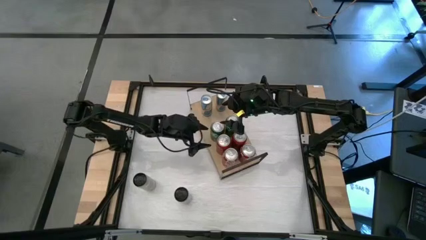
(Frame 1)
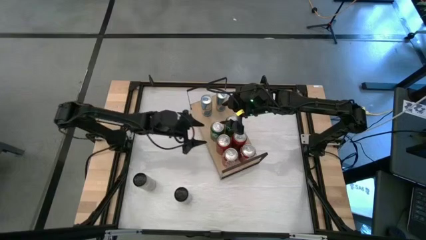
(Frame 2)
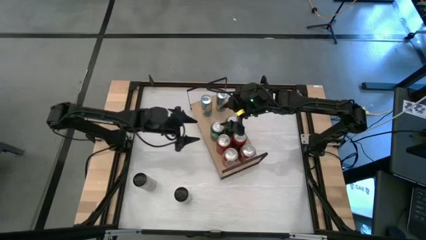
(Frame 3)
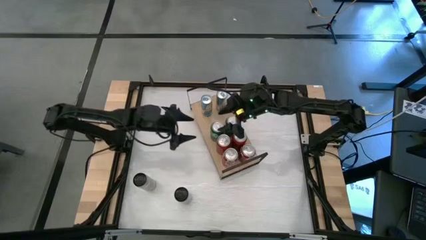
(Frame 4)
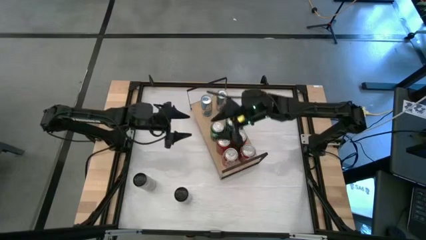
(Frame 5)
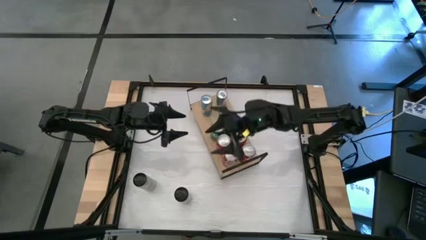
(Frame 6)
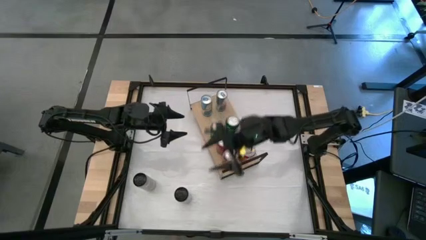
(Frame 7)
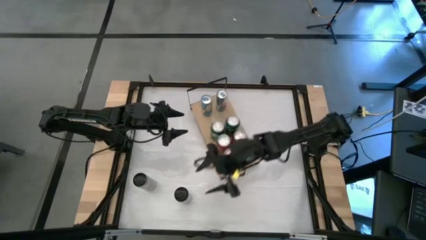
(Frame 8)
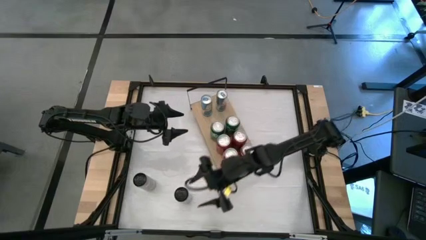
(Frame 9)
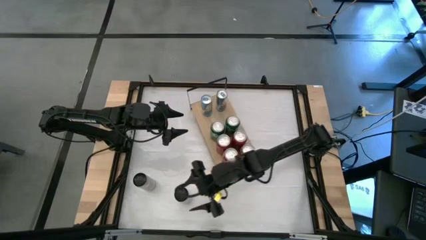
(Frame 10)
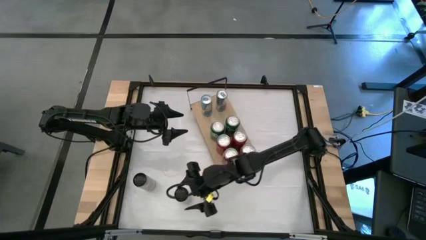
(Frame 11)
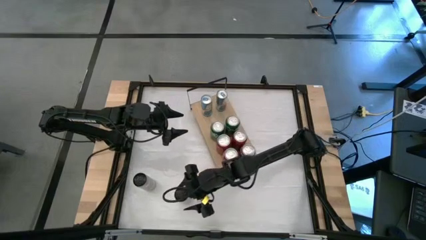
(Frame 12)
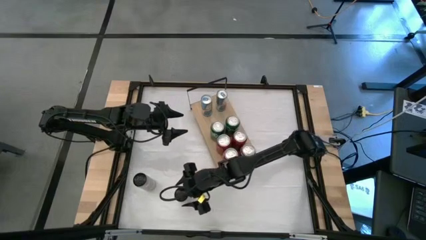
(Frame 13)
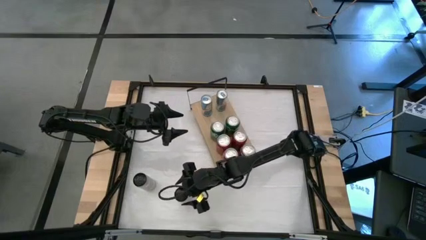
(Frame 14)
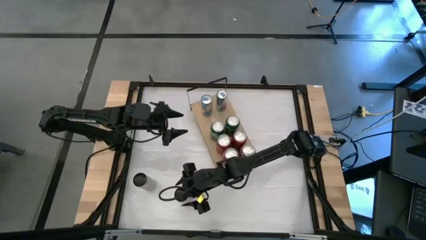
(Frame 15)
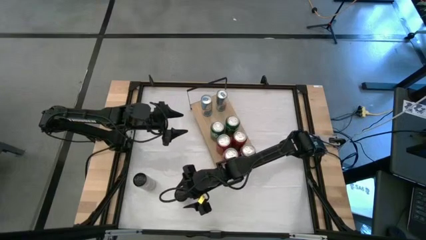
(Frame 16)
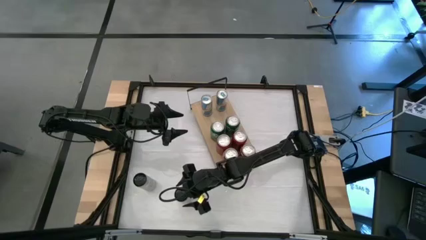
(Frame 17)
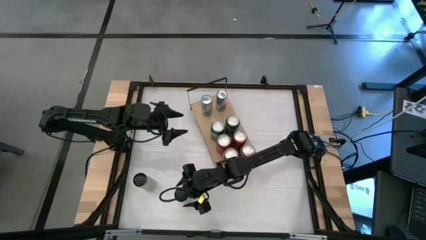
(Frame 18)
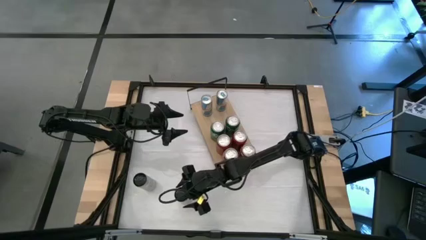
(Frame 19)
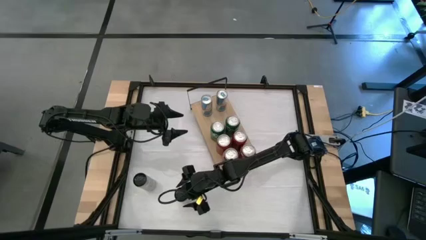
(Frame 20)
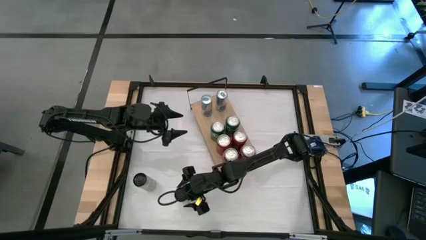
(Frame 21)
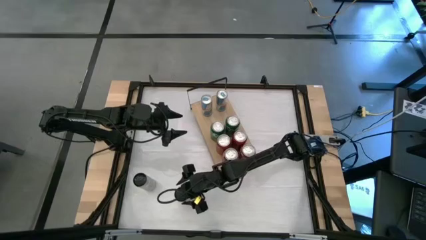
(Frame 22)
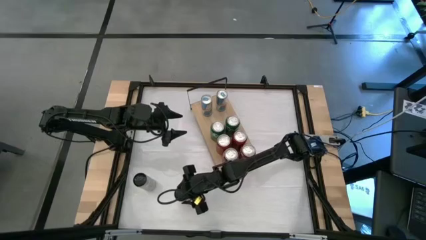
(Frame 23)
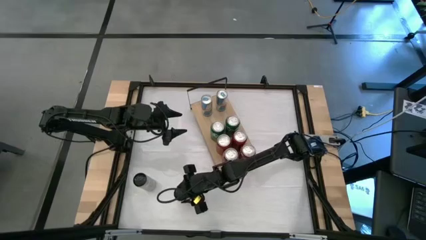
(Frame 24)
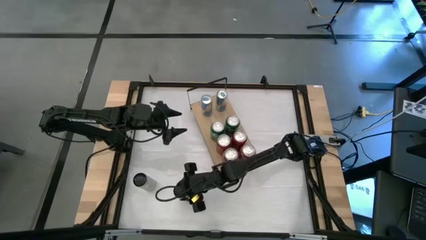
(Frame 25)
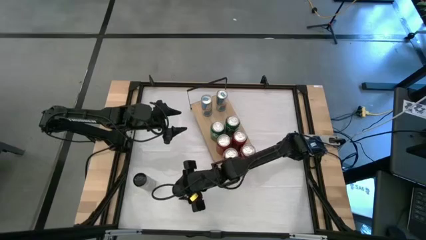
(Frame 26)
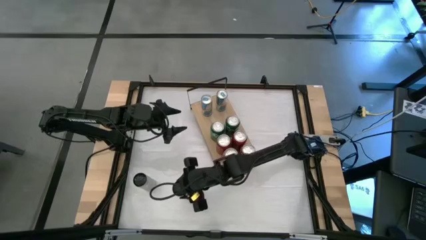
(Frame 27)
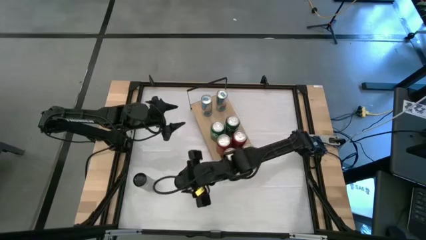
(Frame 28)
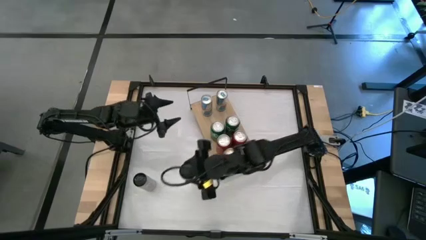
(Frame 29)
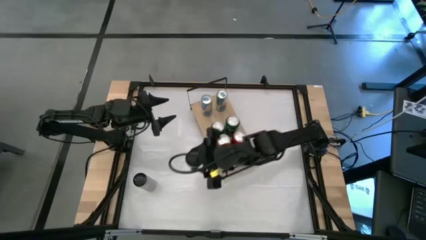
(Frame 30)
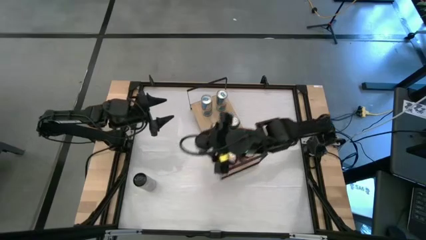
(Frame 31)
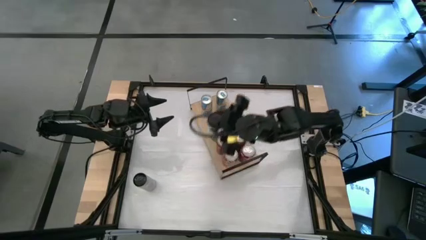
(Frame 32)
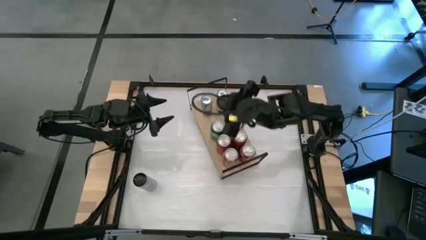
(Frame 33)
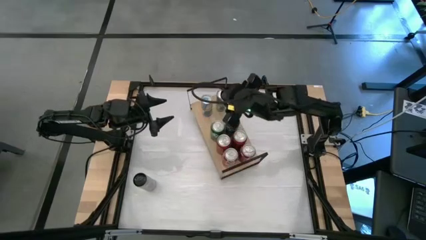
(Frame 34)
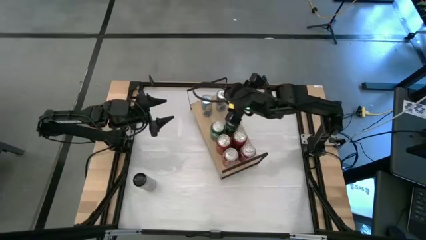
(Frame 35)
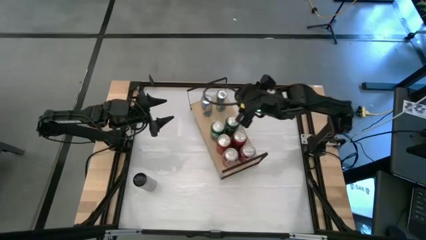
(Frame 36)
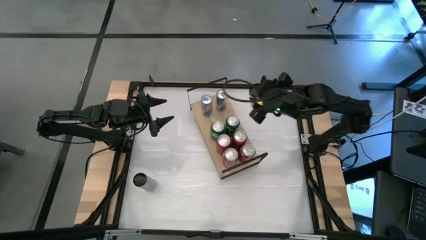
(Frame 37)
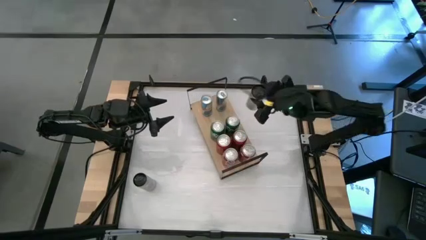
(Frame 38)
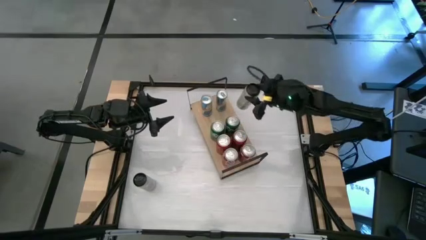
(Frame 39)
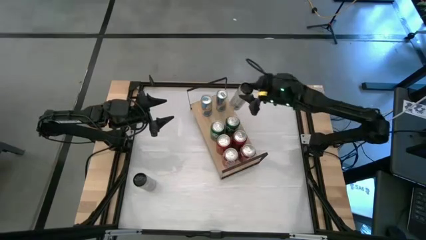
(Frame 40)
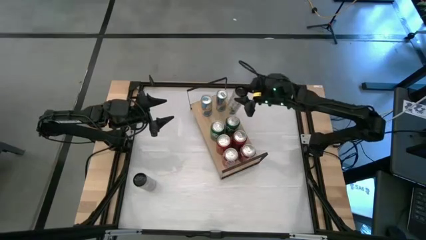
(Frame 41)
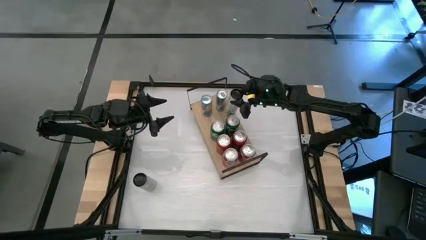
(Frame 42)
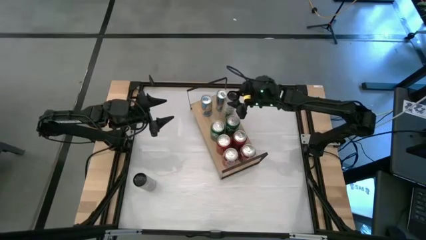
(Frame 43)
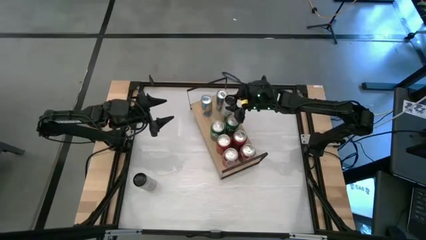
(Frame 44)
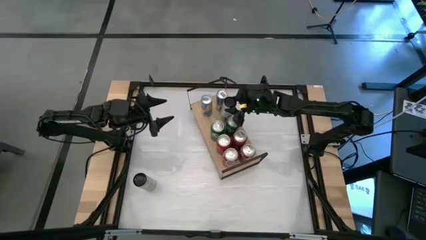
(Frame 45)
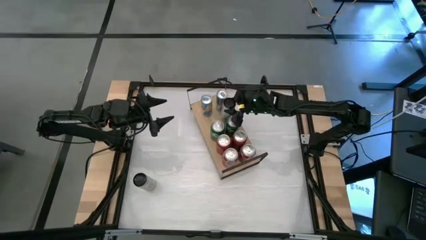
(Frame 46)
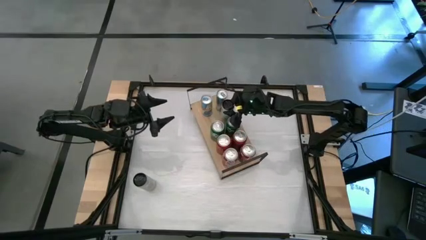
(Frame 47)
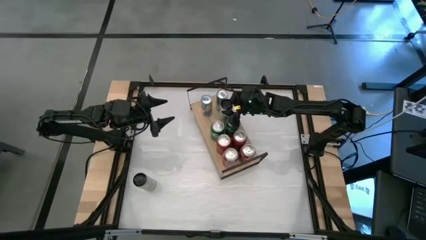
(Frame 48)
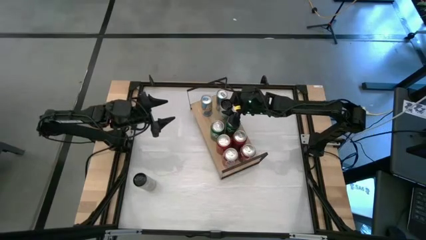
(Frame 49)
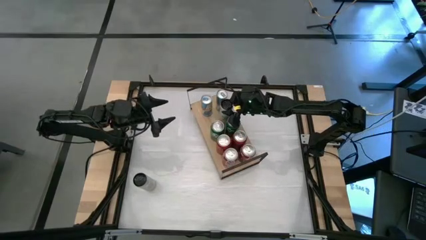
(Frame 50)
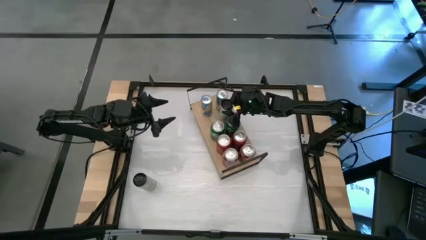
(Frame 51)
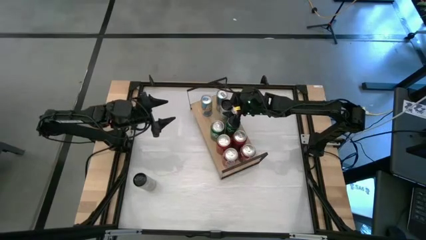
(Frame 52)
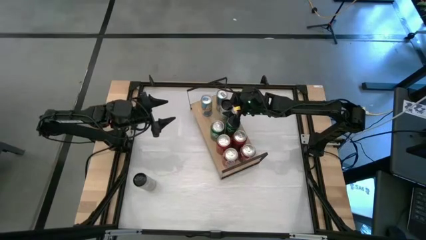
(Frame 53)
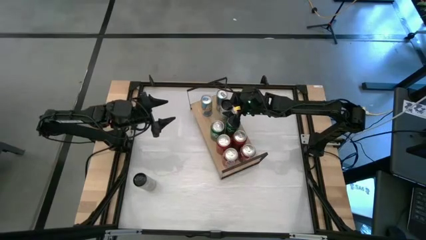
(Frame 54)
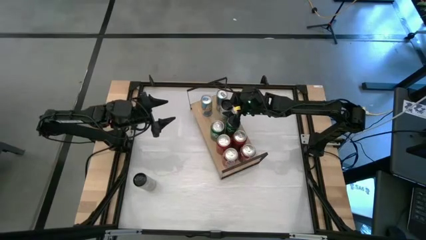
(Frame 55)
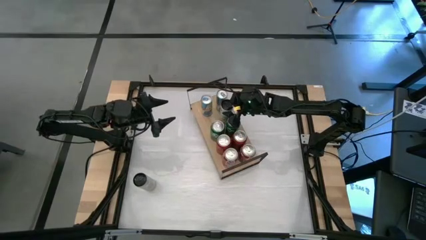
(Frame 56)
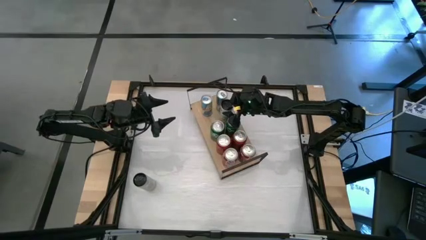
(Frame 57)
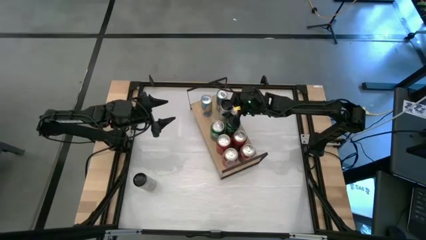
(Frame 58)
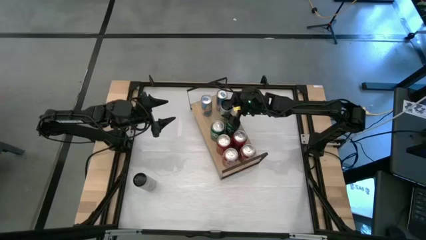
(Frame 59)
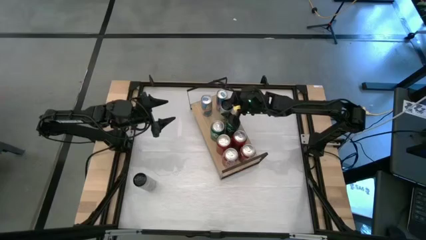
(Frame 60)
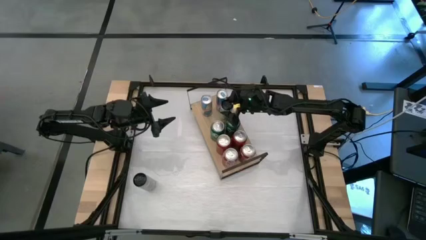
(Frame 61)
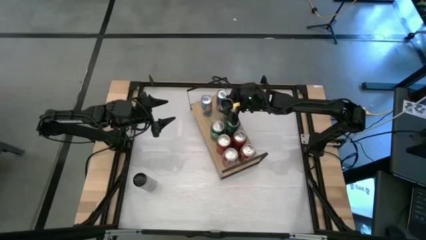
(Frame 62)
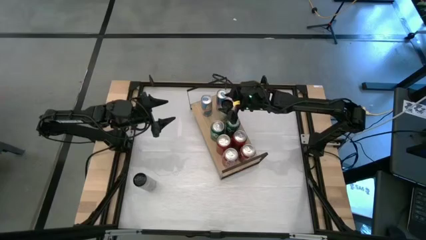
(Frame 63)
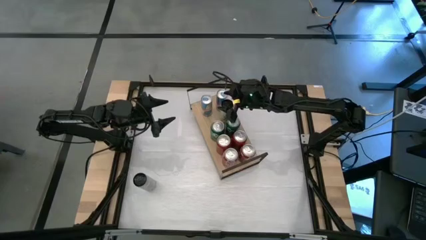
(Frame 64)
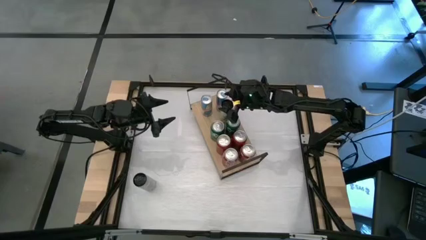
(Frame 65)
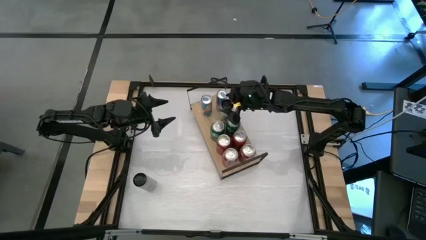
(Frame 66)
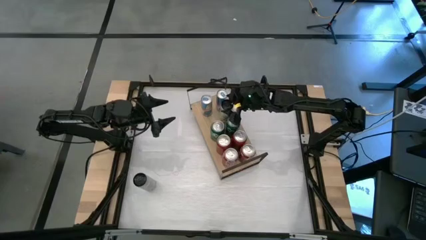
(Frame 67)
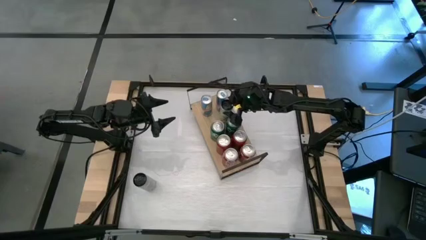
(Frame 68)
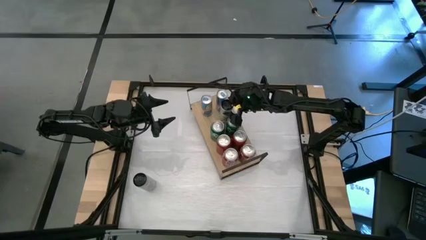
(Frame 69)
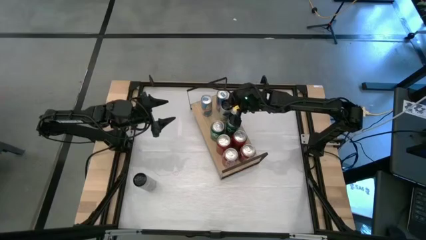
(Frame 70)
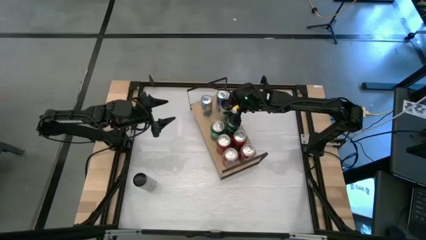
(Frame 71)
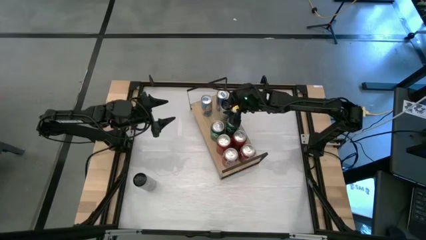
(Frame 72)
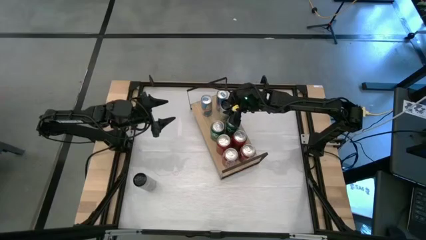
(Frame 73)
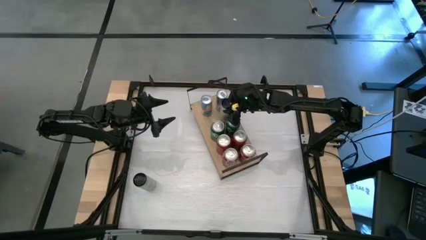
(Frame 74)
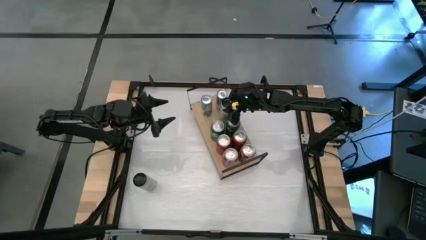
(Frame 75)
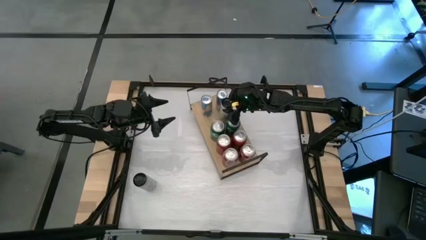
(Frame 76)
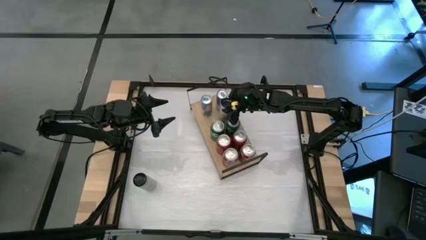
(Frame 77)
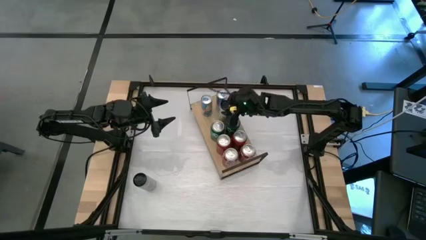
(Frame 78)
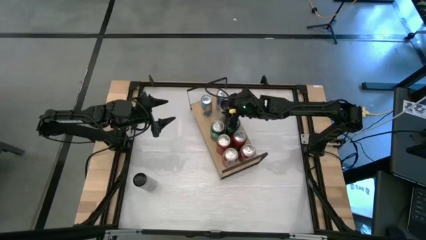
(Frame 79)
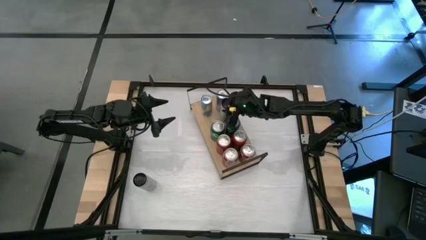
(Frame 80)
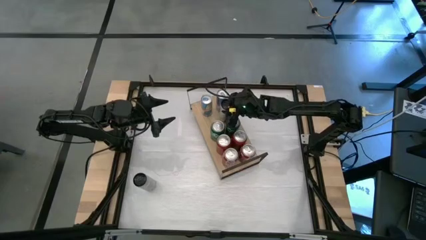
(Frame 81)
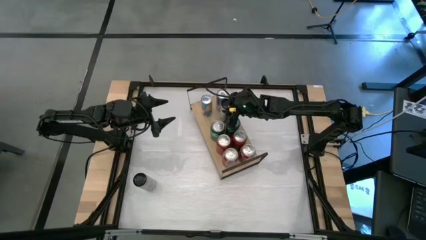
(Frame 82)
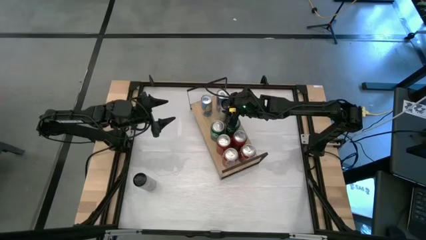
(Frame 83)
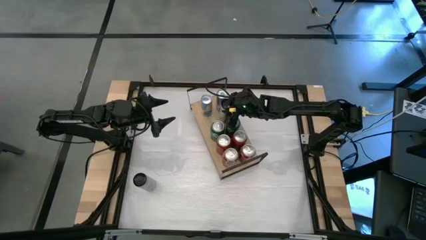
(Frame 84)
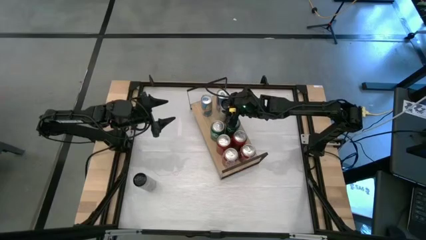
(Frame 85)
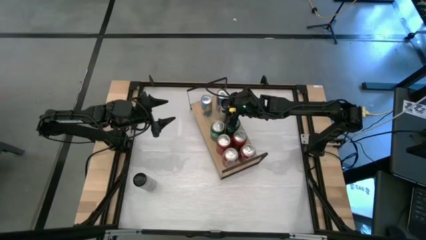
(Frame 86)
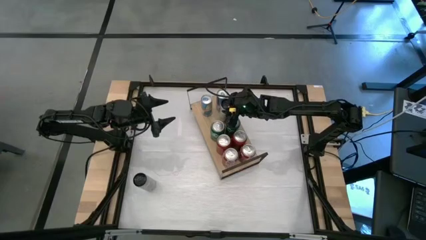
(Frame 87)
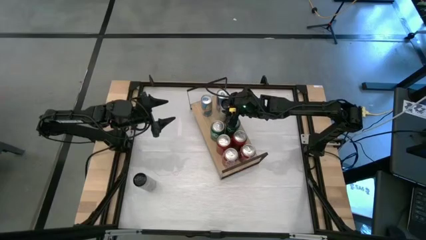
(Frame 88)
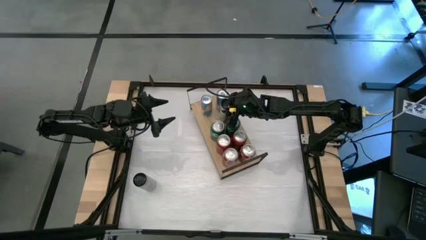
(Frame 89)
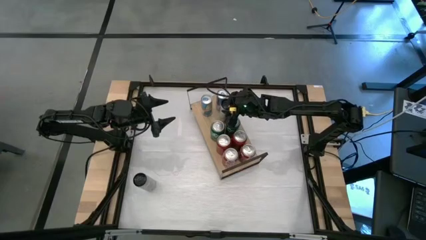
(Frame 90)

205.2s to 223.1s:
Task: Place canned beverage on shelf
Put the right white-yellow soda can on the shelf
